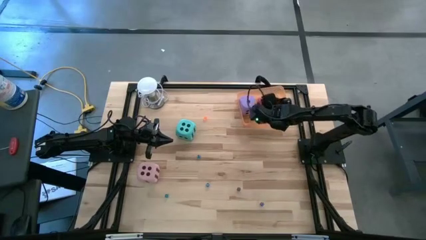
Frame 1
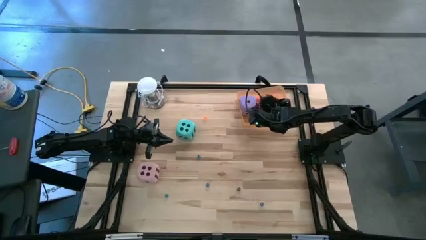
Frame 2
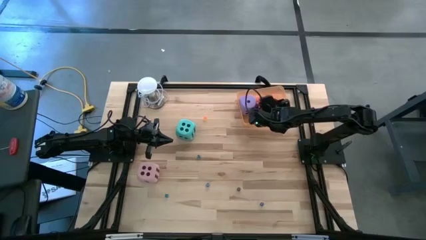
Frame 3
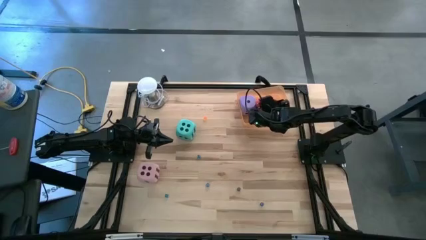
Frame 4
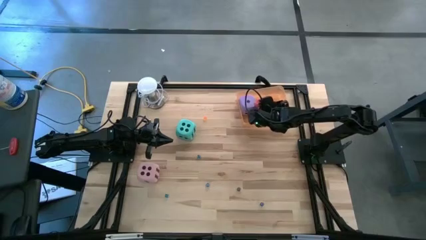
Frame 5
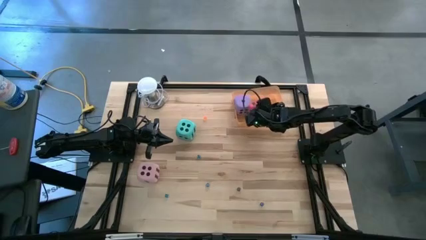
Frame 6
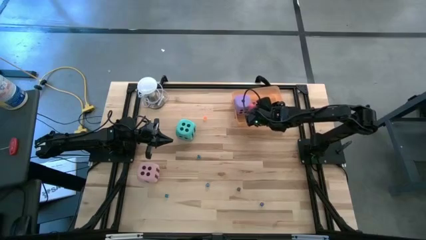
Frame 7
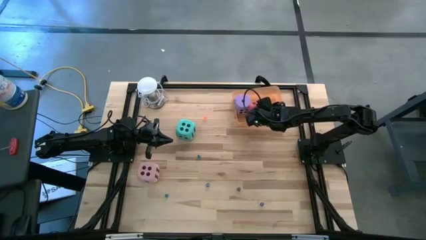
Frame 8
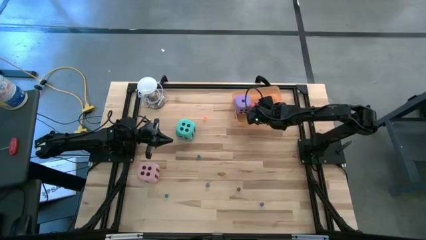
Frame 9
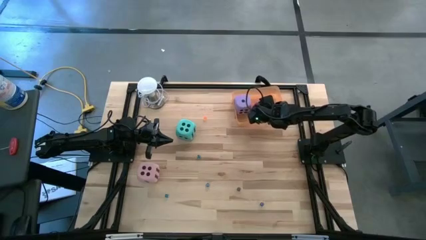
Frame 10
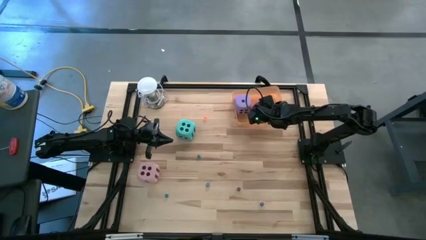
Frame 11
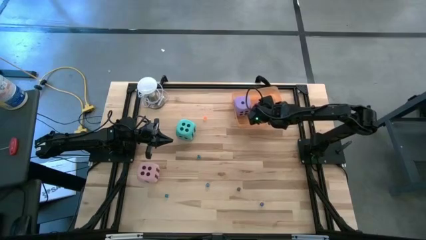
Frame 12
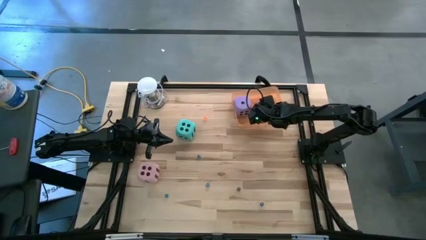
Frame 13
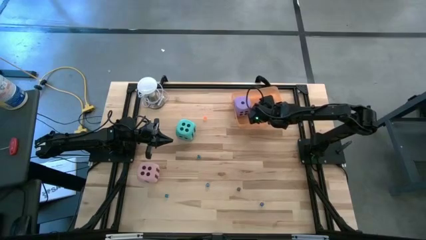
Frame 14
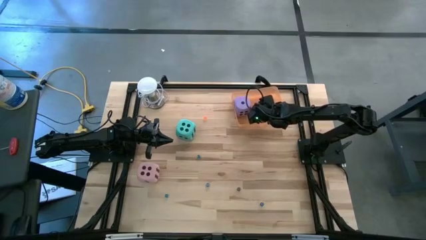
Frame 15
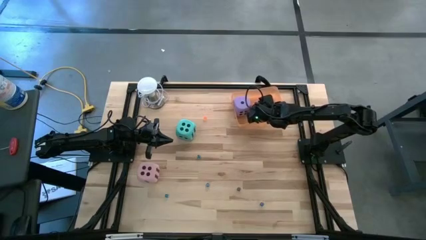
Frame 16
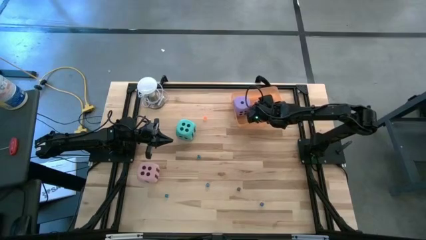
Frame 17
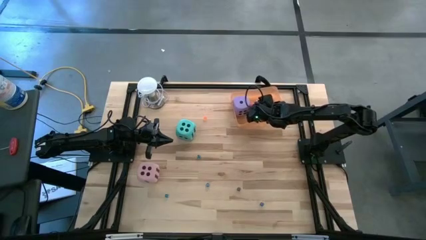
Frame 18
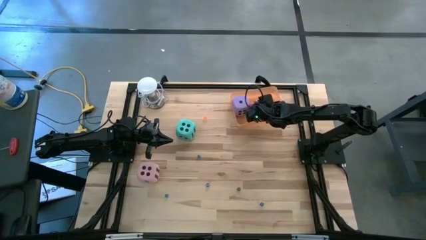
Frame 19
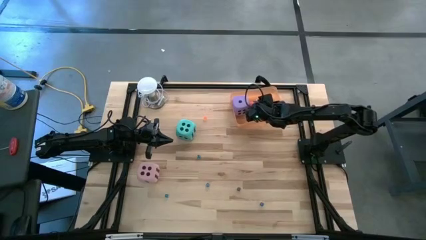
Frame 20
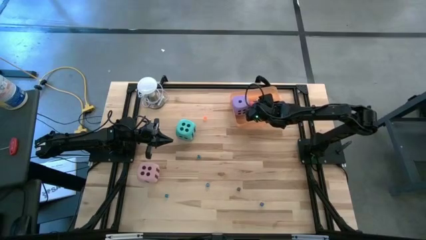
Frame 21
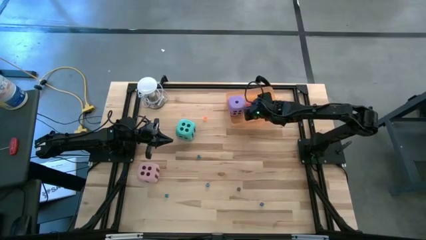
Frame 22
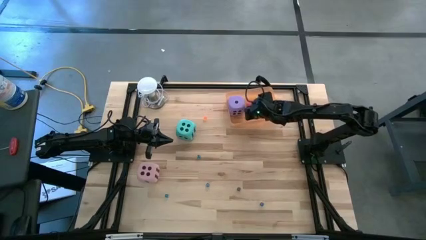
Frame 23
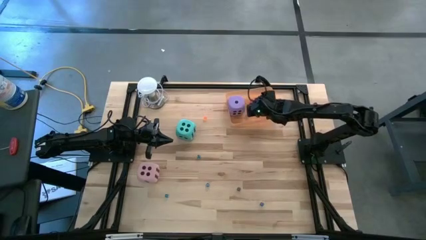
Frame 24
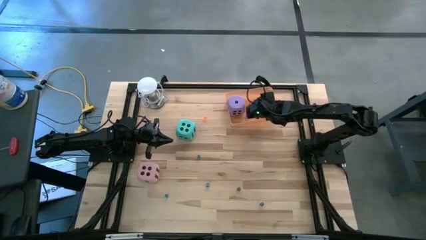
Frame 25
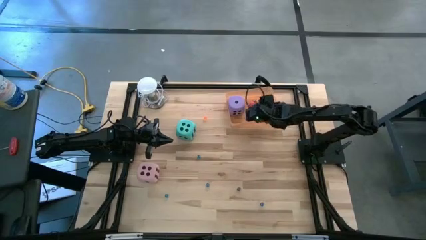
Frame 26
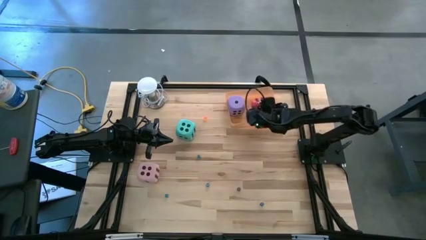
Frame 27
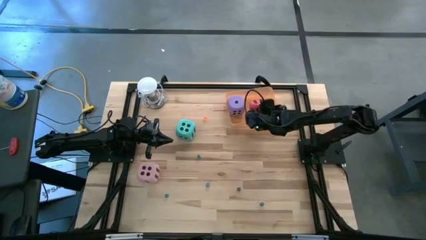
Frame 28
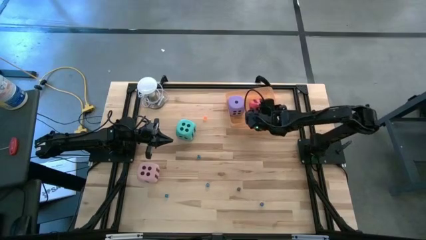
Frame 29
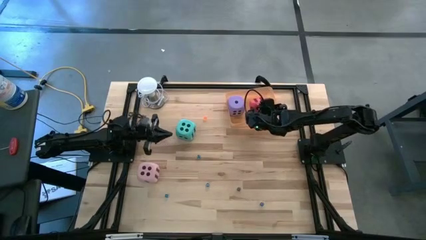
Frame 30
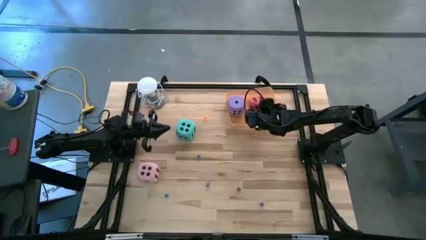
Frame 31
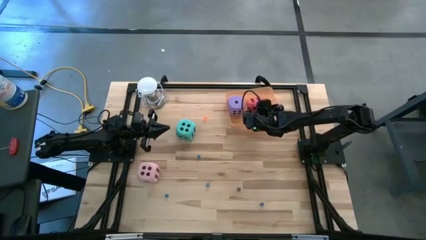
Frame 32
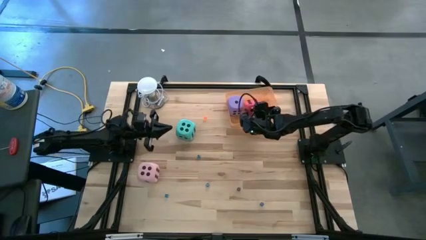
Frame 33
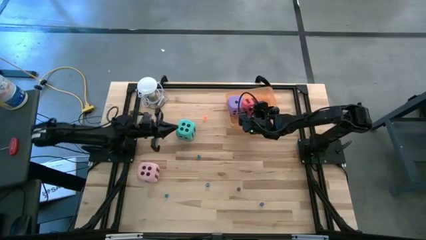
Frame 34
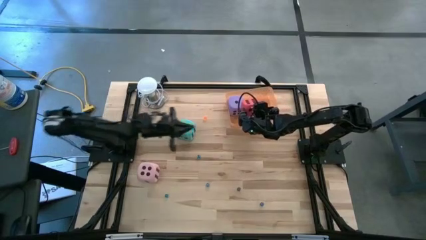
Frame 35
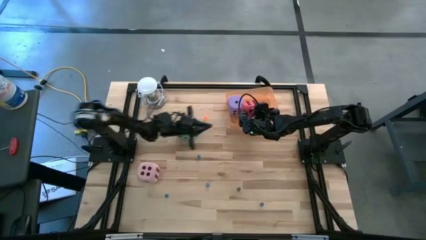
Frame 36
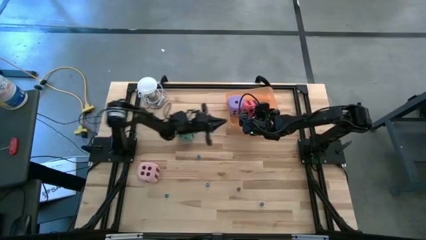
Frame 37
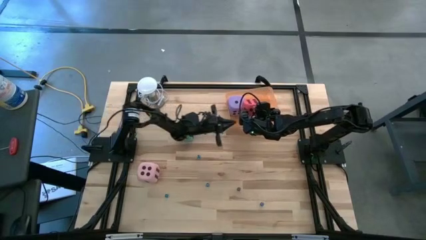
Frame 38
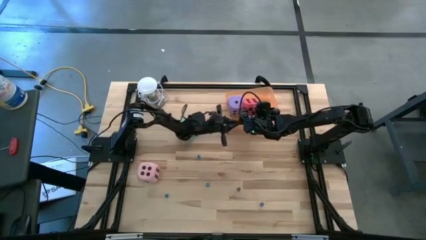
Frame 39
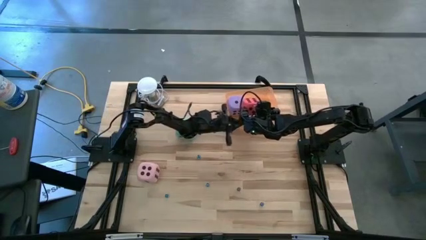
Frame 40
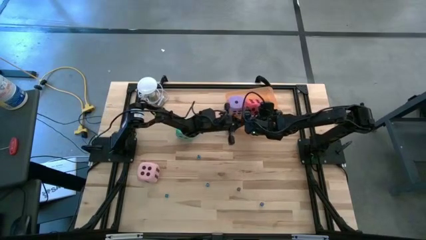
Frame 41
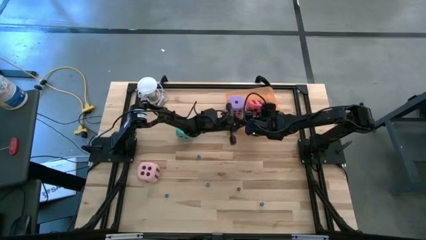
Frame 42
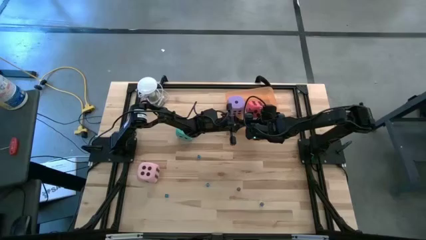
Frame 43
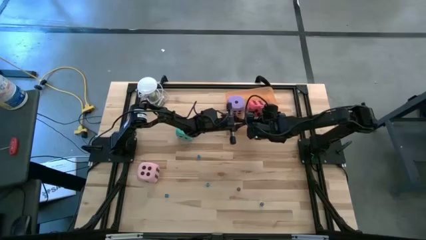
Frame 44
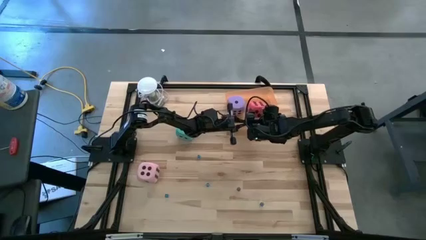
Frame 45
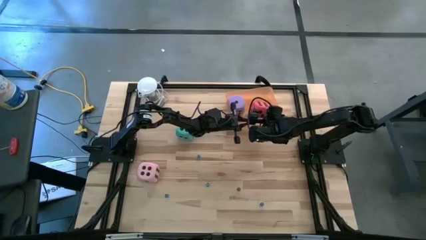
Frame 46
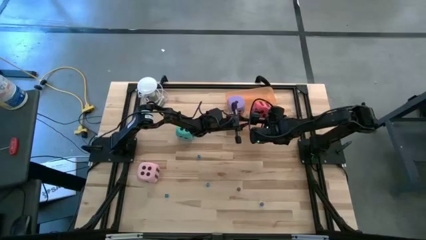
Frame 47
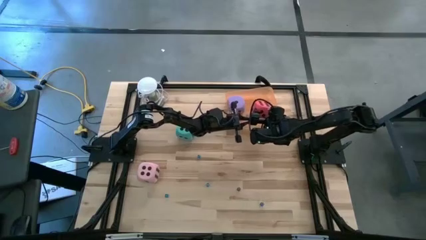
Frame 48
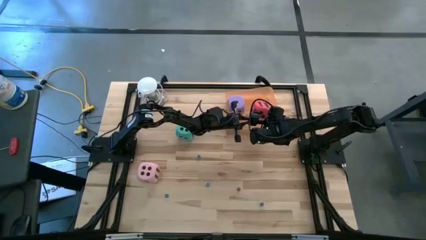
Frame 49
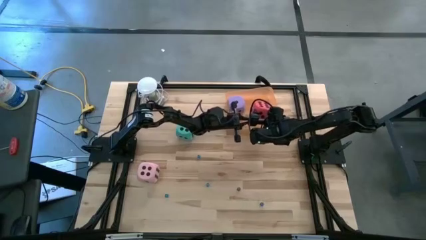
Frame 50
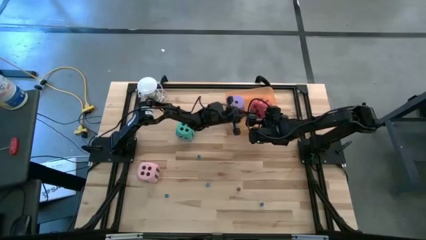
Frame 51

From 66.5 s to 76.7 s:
Task: Pick & Place Dice
Put the large red die into the the orange bin

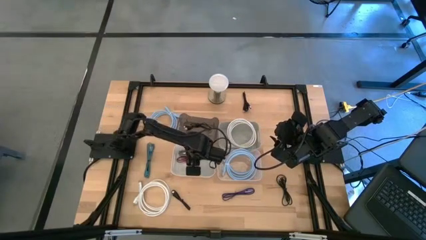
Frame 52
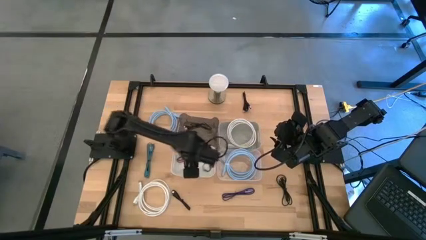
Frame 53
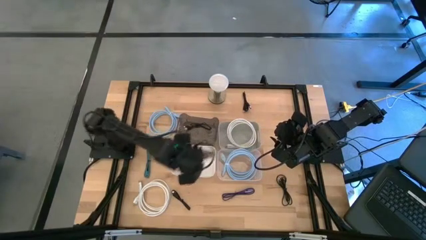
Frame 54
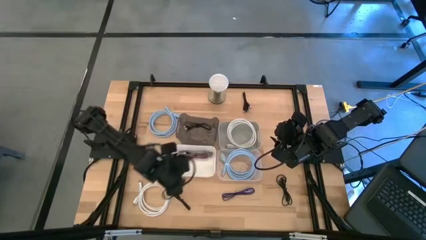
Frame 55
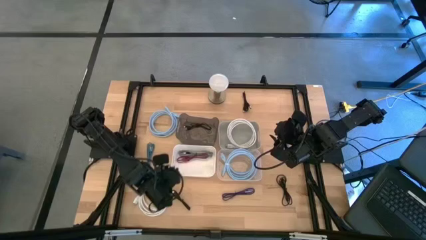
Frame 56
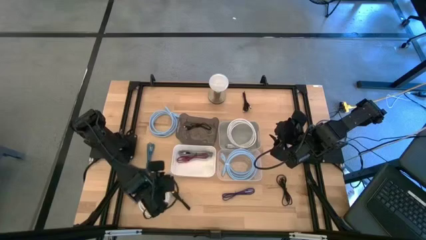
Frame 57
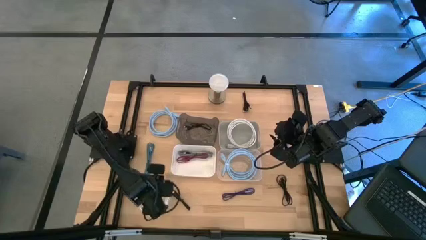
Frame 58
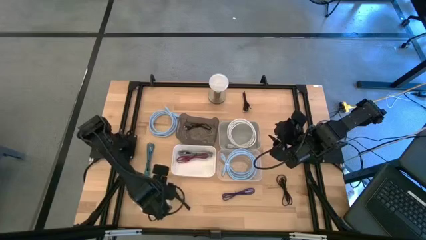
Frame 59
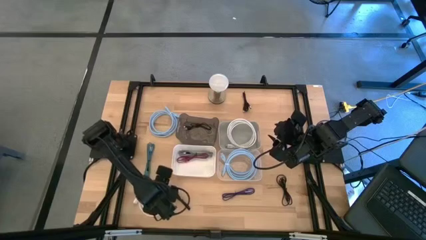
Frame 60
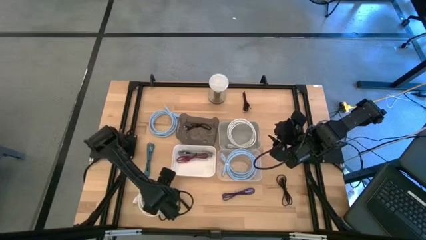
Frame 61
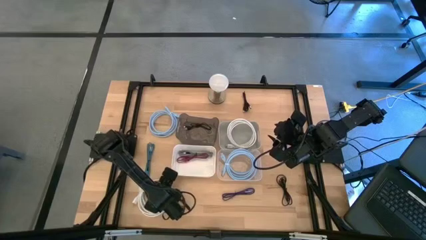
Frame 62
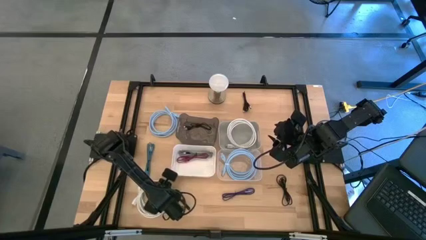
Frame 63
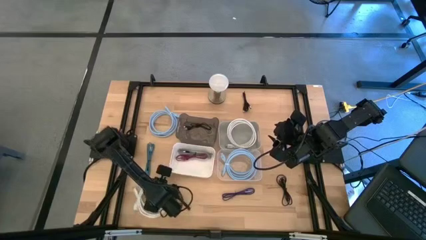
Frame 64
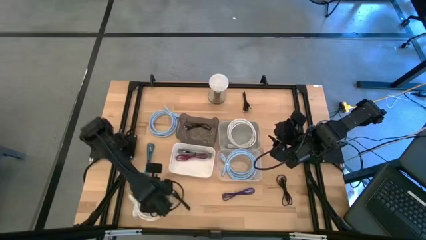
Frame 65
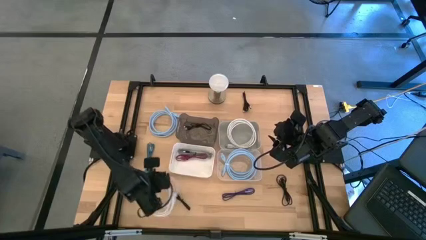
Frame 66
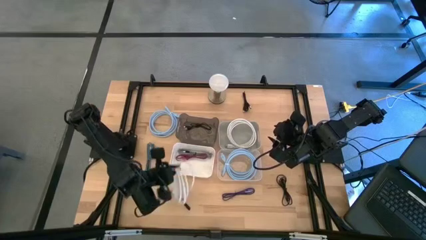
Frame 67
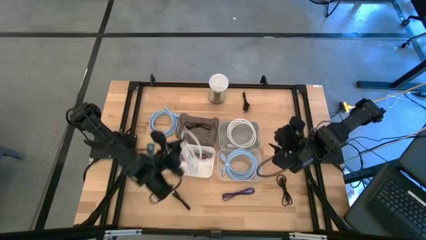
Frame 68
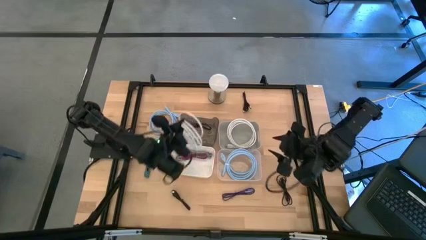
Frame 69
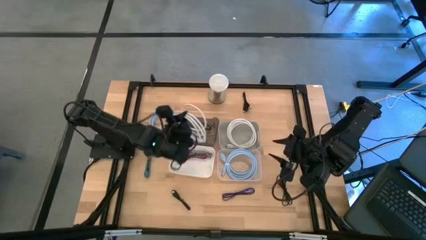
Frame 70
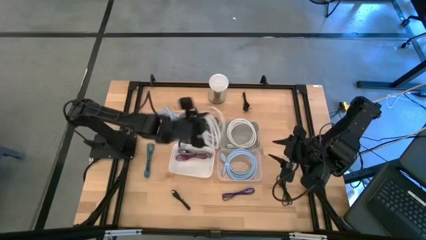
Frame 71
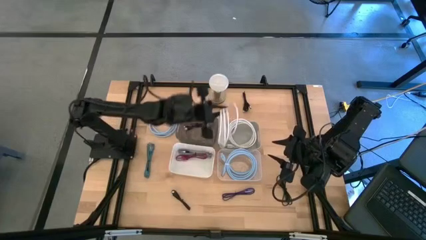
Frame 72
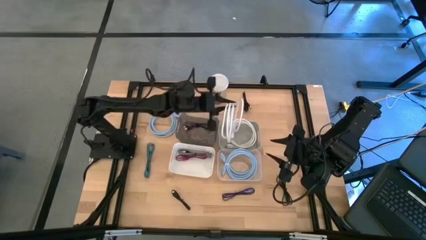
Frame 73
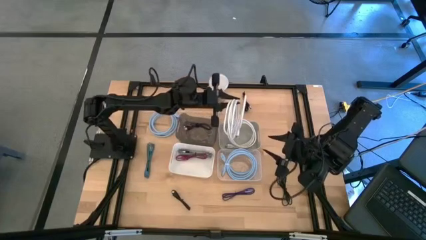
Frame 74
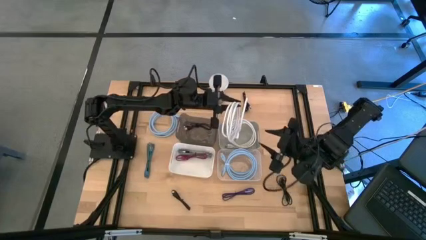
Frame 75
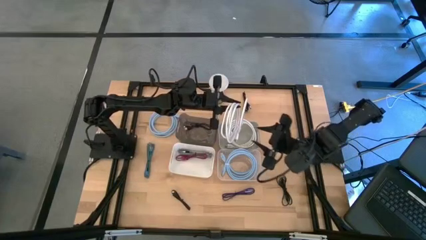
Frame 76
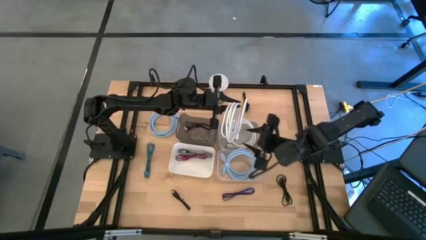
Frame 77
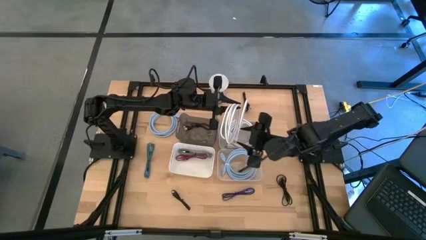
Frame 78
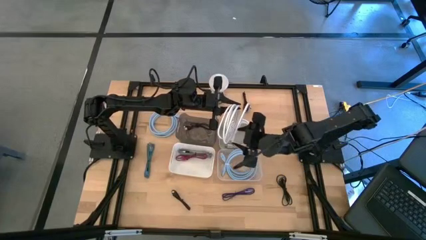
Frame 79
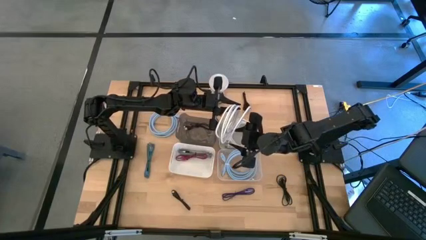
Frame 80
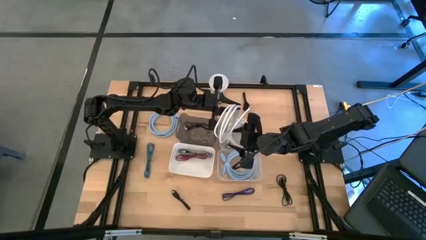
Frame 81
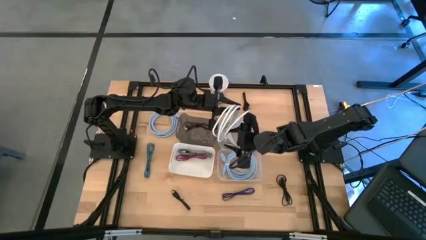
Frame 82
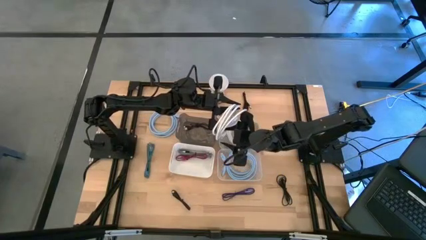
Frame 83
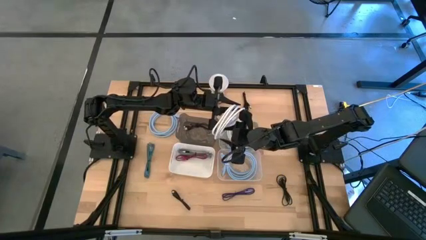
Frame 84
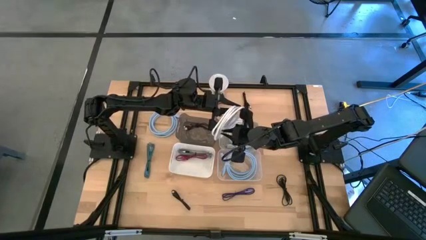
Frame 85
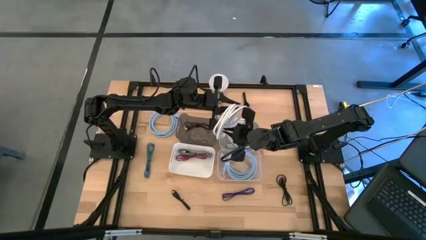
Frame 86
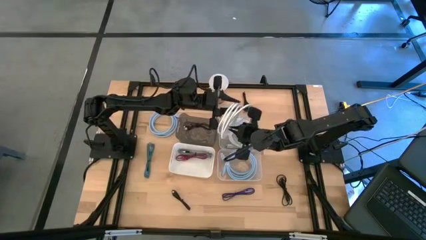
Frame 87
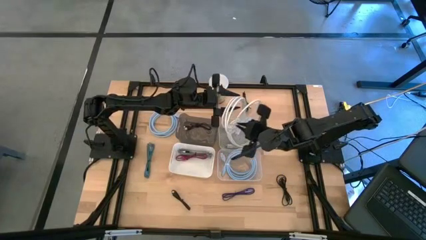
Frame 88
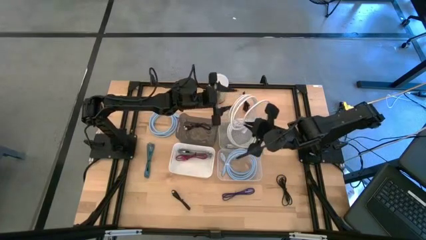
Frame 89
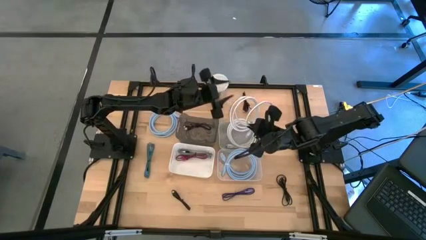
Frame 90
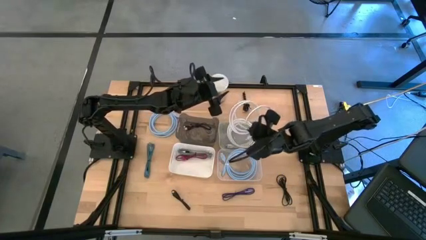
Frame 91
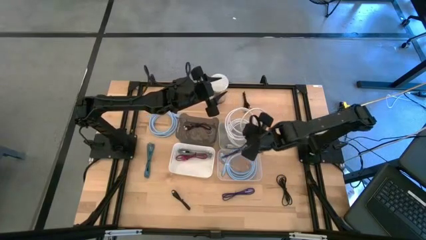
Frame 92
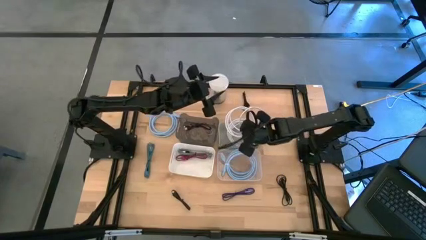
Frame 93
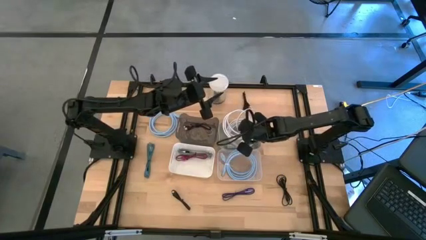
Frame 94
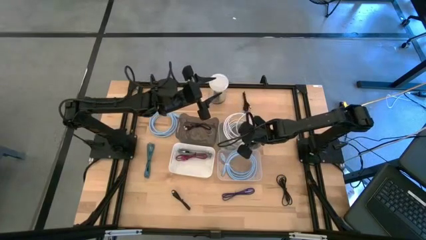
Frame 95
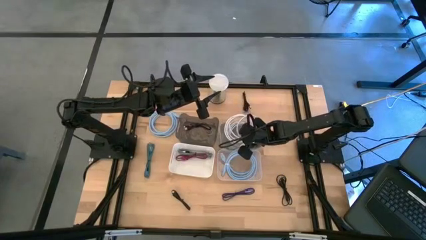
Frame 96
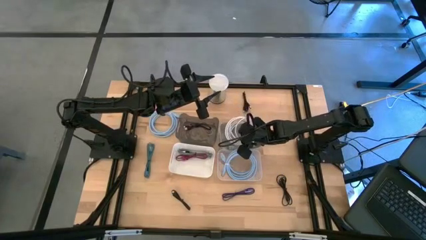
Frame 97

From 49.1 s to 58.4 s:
Task: Pick & Place USB Port
Put the white usb cable into the gray bin
